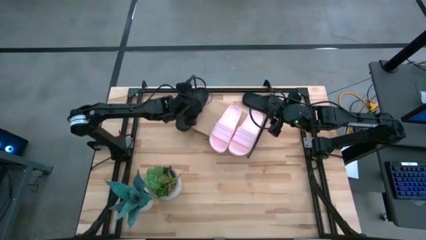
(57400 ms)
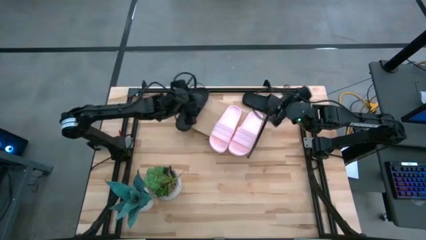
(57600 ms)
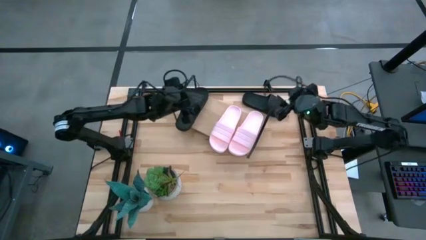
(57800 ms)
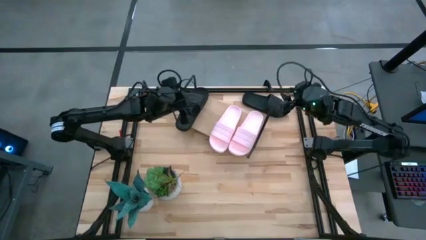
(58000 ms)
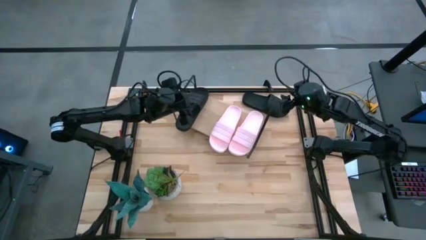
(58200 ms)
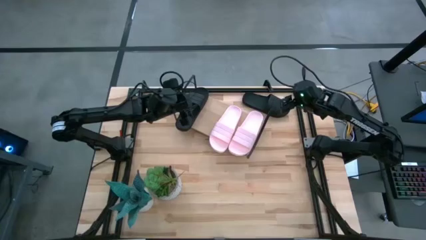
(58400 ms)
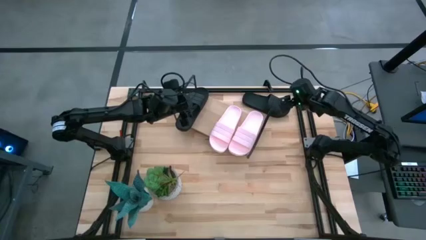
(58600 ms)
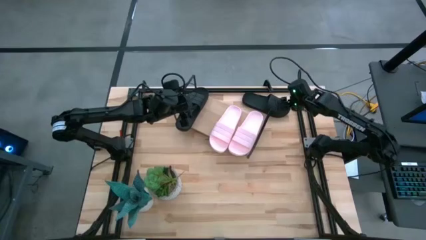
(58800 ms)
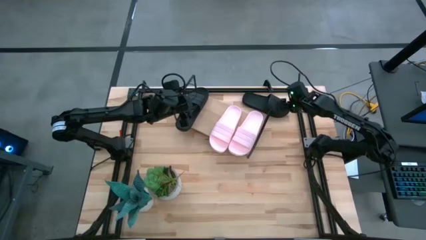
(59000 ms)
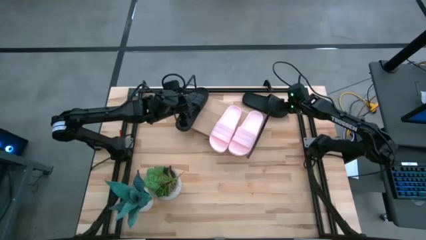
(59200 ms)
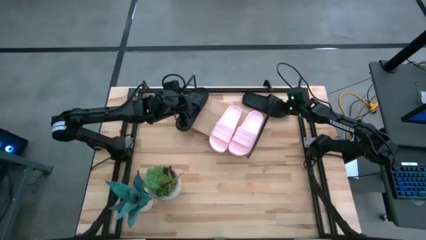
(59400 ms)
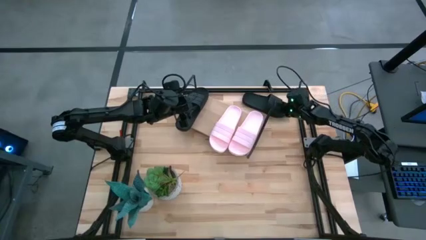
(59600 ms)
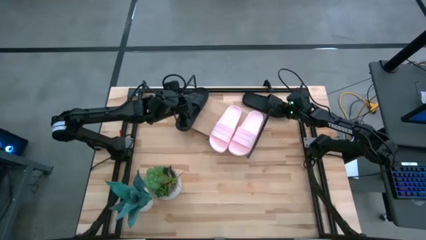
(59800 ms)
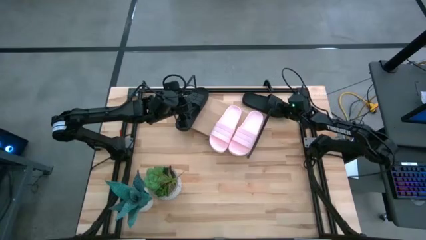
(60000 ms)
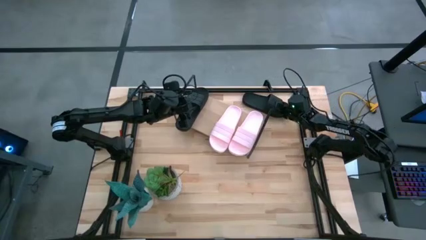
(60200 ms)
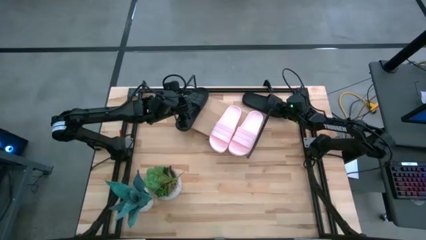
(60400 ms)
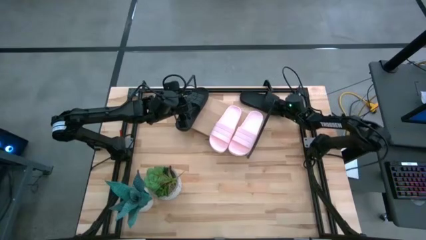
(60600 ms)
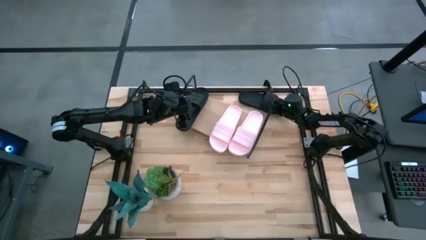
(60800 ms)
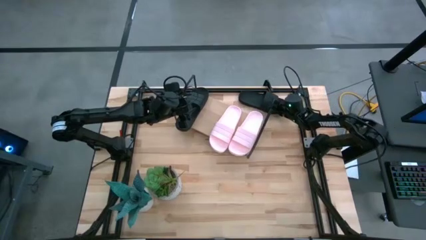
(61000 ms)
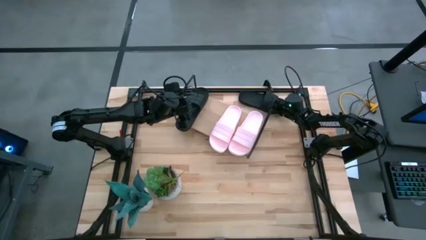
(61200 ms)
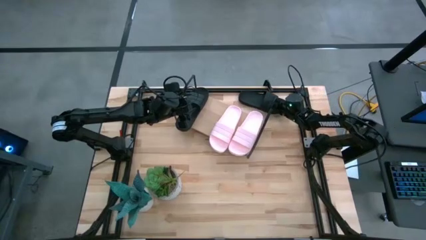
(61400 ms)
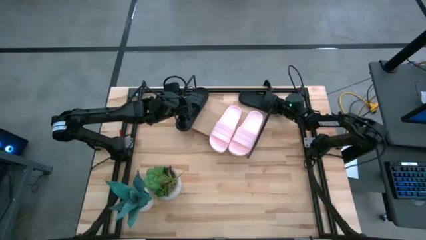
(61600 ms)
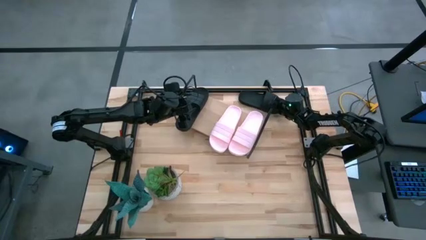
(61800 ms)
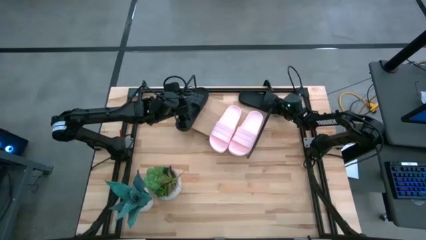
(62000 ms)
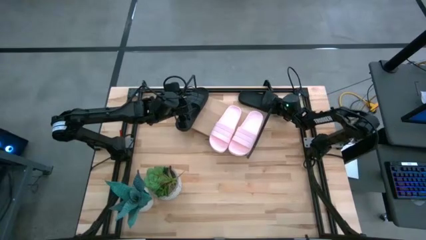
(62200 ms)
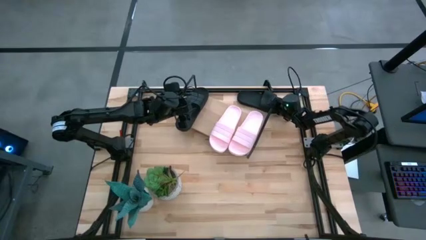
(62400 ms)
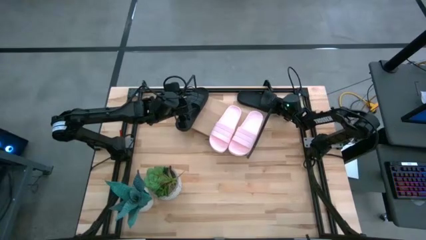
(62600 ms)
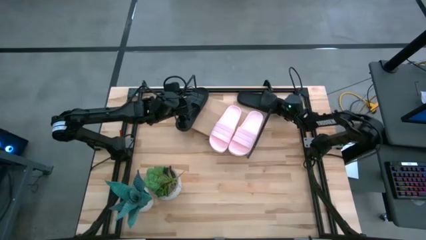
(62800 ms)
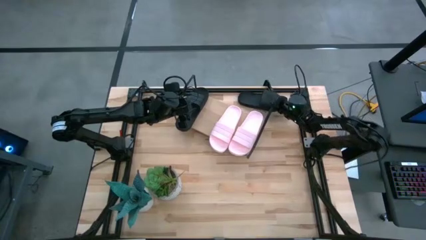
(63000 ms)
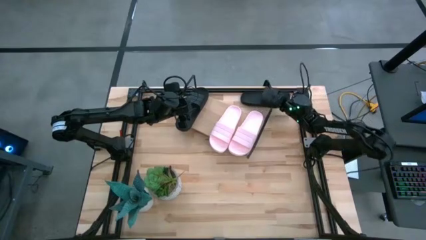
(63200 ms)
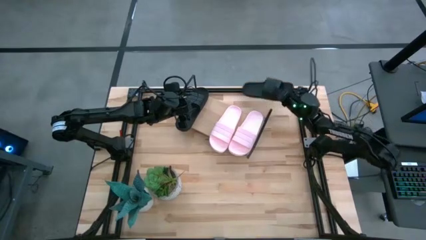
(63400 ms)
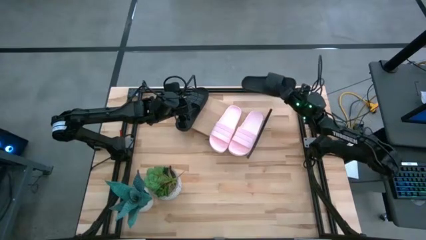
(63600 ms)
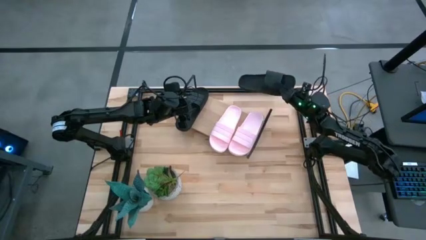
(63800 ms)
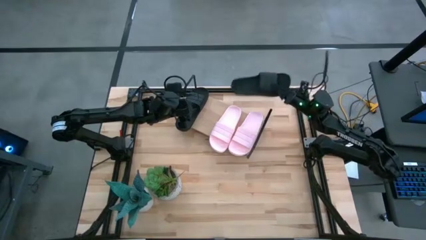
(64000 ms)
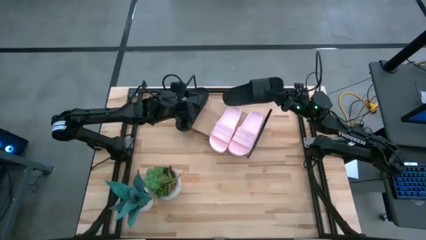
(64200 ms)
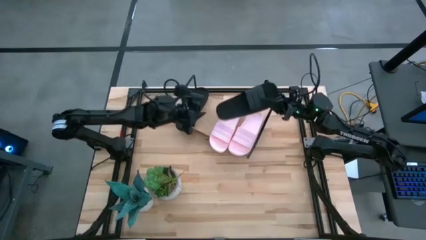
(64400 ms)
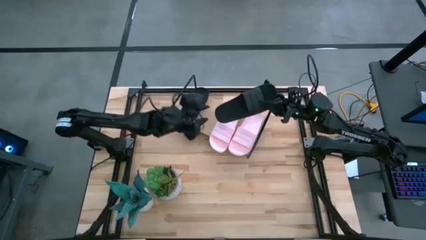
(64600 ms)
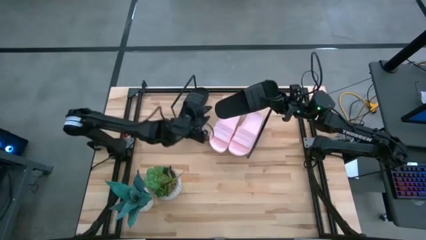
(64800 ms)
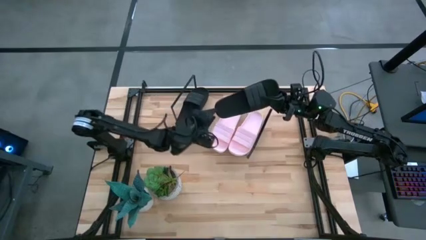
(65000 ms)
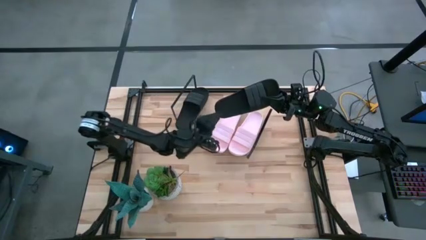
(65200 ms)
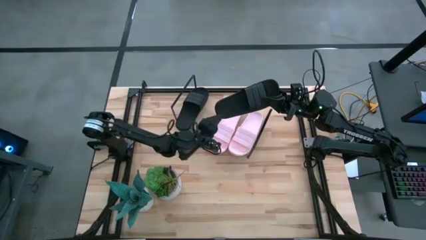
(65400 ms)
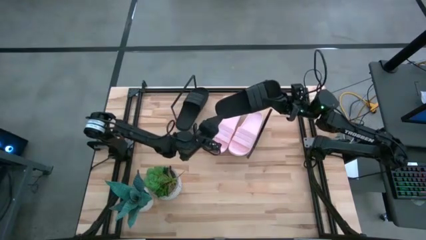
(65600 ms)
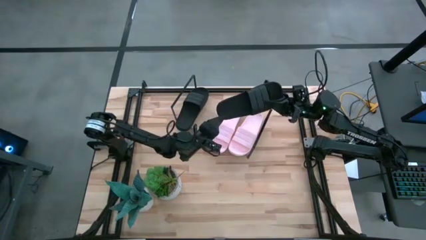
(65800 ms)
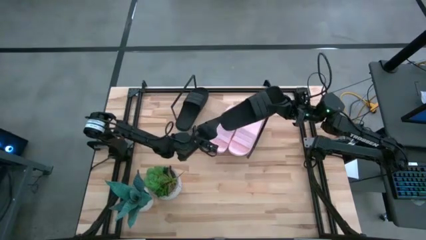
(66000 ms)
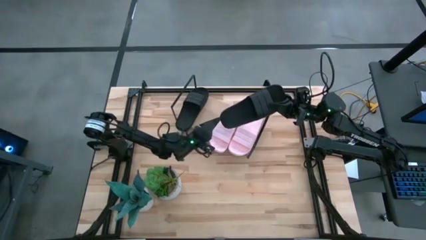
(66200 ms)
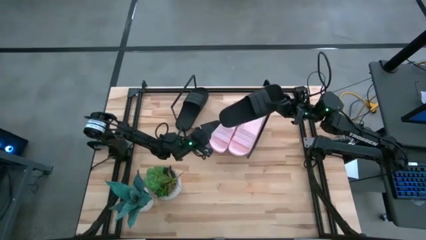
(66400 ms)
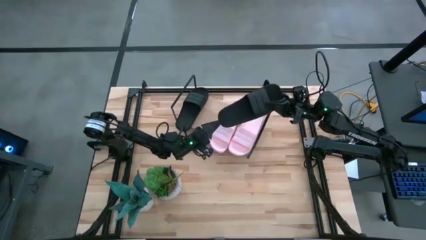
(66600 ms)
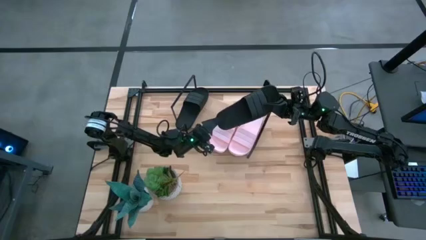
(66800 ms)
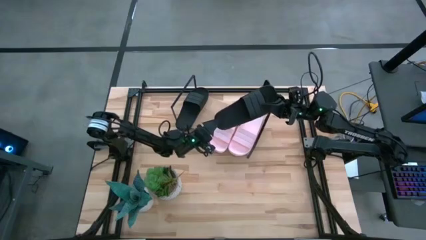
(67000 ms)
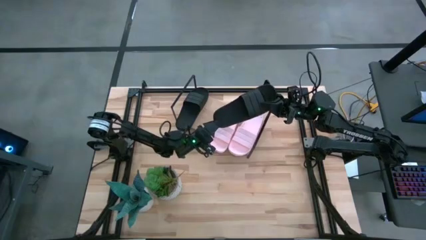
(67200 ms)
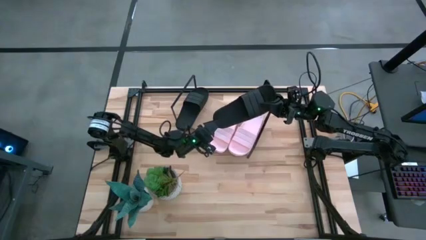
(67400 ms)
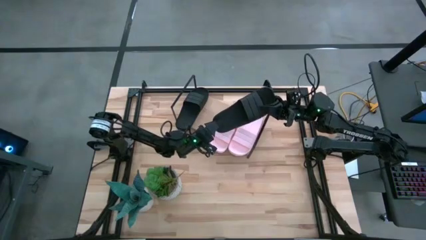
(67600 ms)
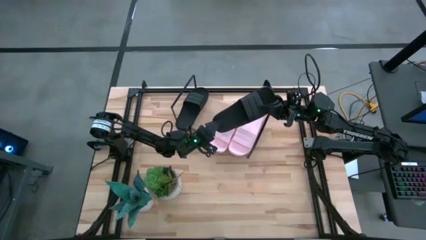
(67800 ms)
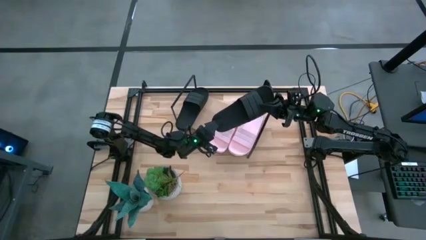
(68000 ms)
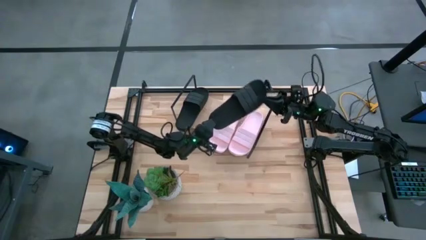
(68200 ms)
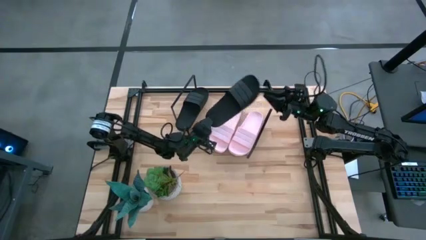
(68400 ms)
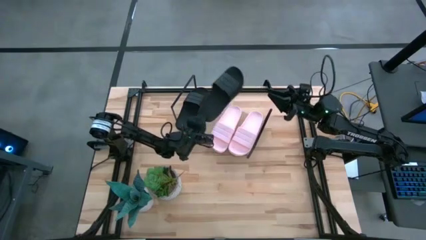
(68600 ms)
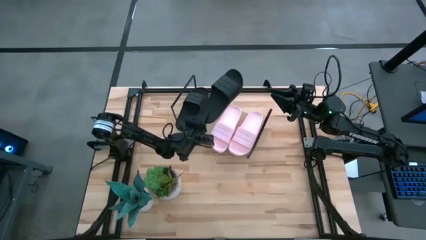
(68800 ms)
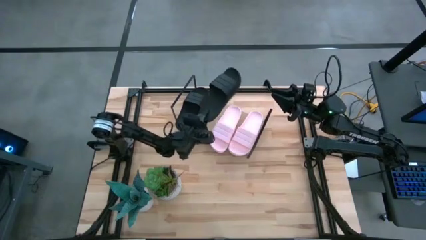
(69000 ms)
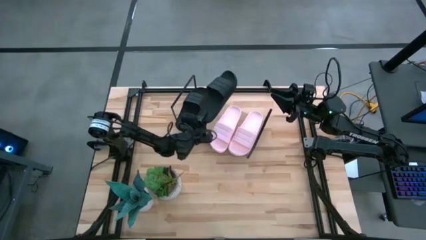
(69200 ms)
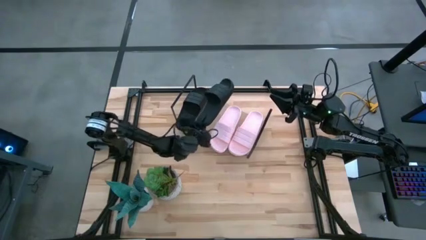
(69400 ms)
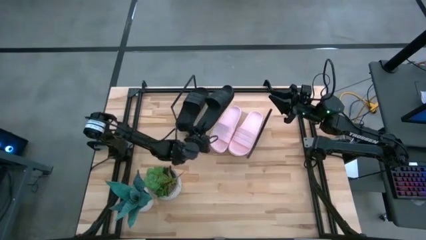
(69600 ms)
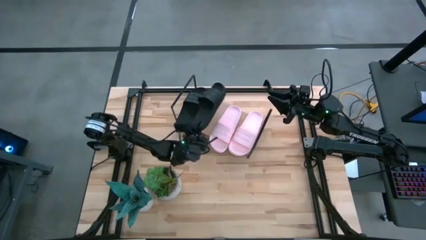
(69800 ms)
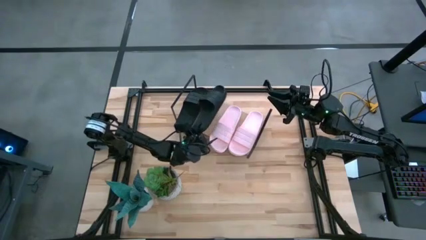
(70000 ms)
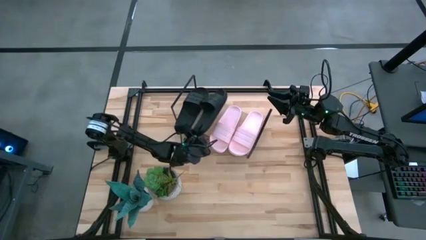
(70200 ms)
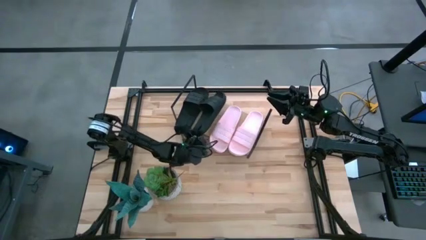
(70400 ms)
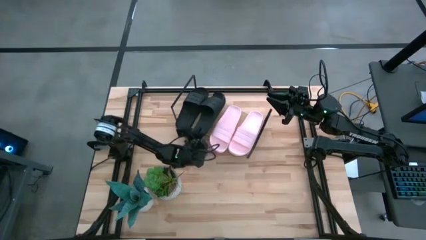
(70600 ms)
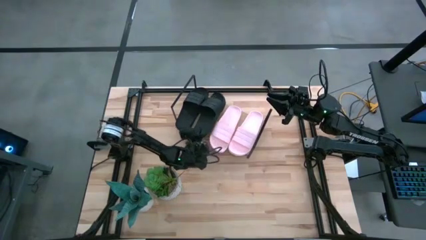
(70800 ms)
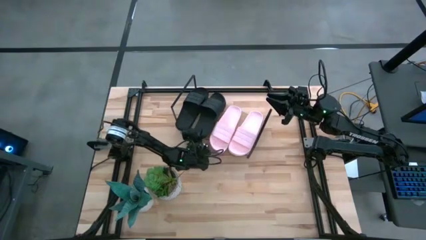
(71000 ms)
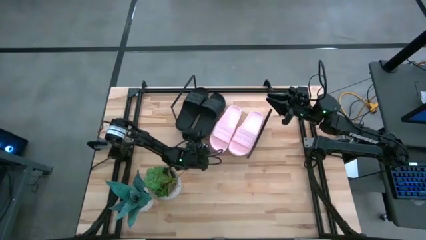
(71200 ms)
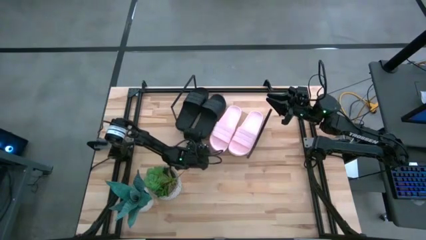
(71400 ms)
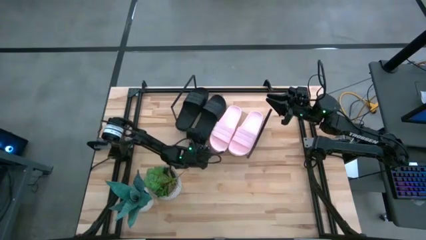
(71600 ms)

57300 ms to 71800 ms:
Task: Pick and place slides into the shelf
Put the black slide on the shelf

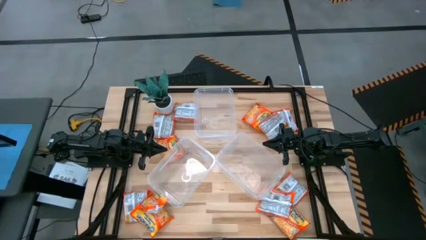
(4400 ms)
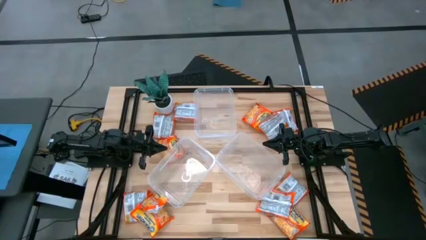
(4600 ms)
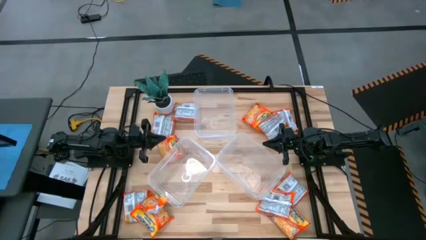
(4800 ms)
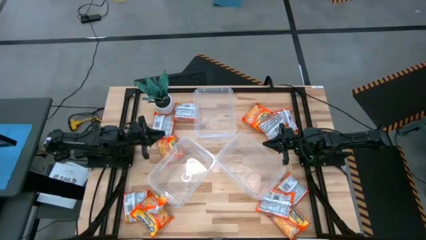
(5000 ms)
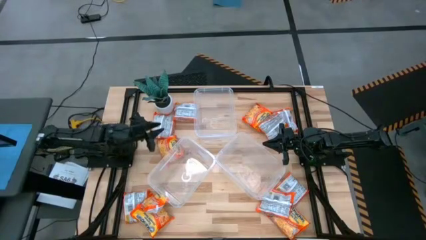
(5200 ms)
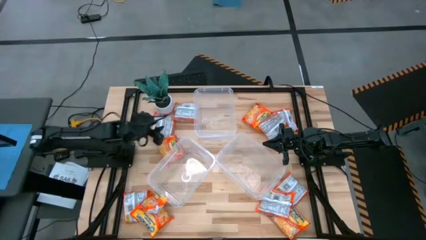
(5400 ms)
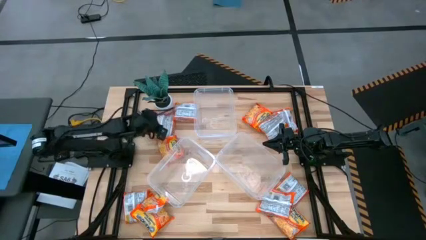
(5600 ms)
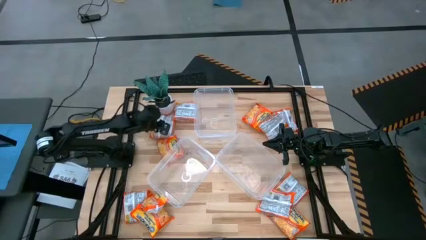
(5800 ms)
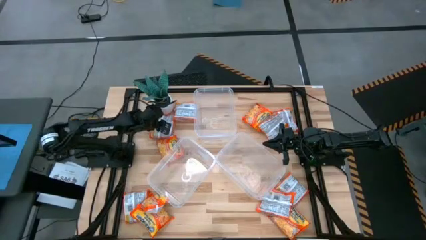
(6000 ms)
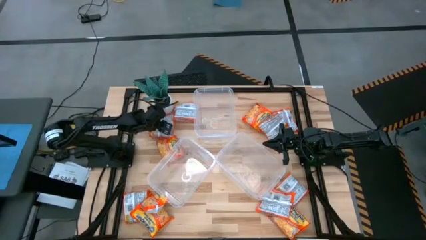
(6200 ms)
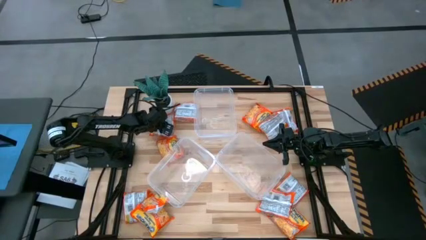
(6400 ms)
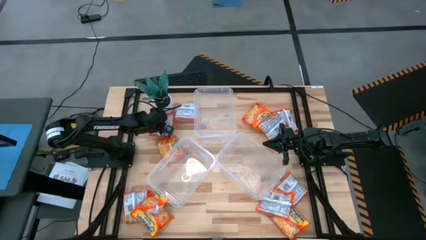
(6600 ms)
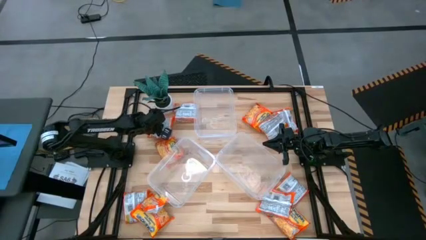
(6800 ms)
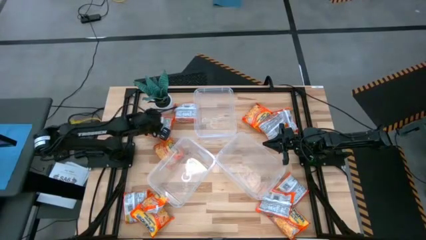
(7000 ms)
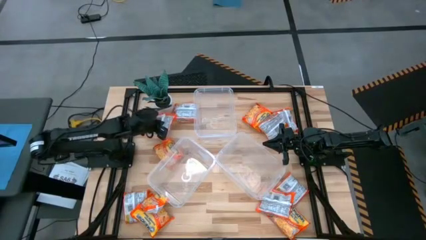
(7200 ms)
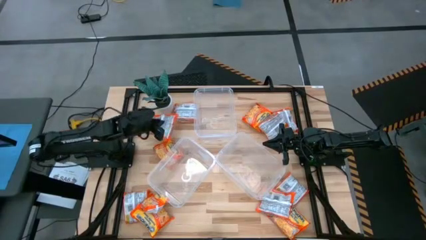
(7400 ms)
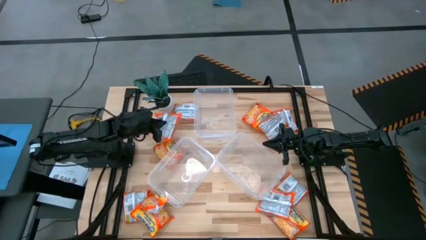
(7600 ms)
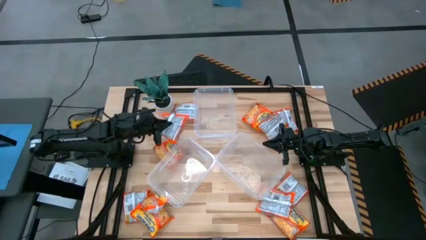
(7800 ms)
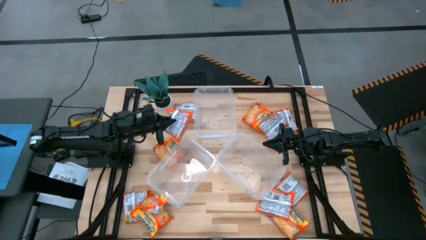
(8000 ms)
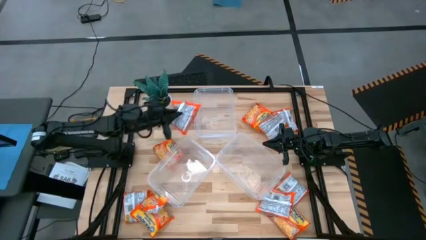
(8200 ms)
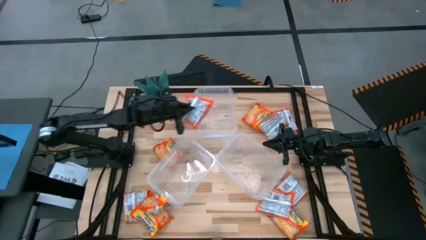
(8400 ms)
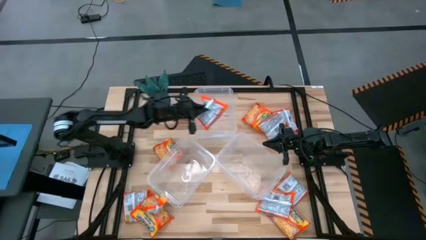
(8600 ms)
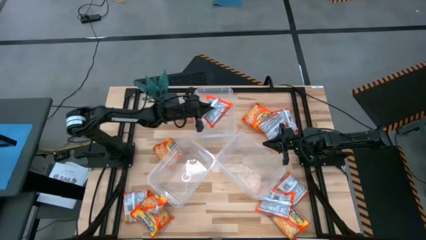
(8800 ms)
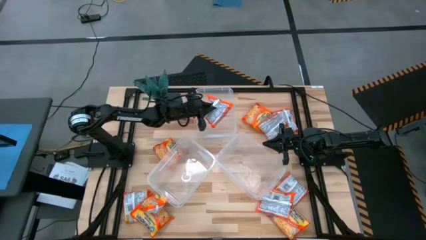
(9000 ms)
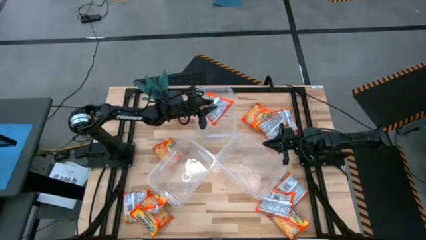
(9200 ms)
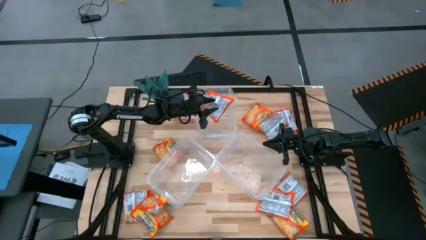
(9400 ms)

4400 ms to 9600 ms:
Task: Sort Maruchan noodles
Put the noodle pack into the top transparent bin
